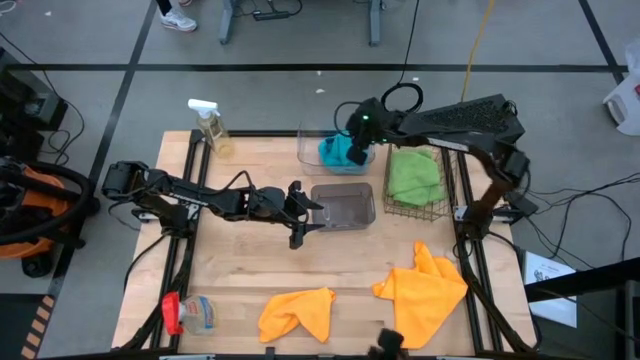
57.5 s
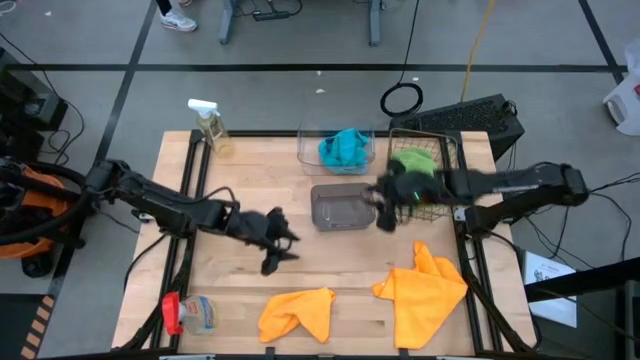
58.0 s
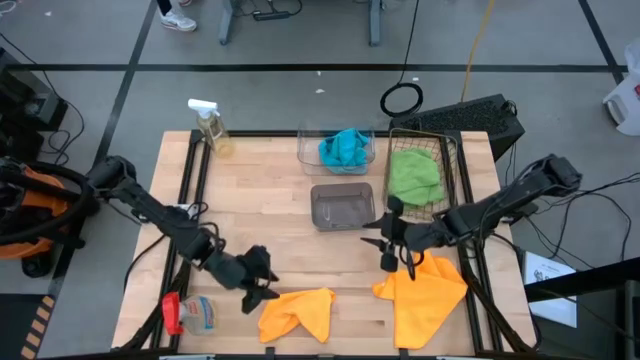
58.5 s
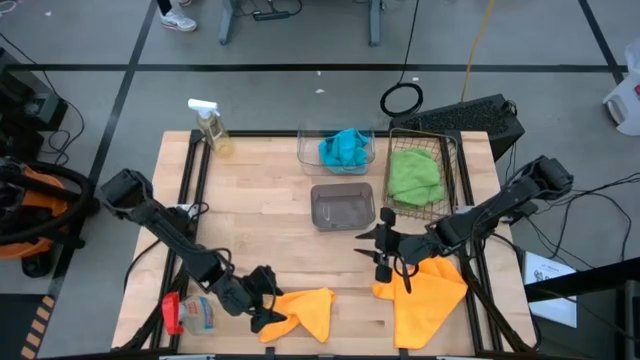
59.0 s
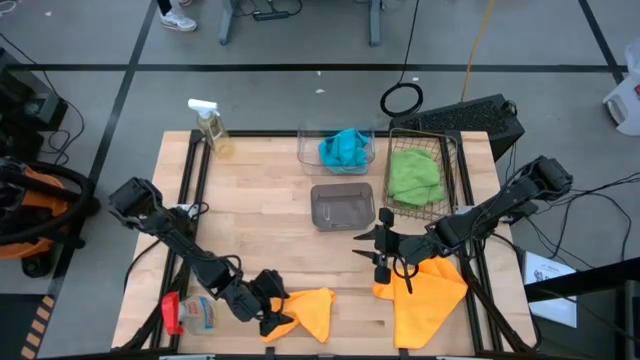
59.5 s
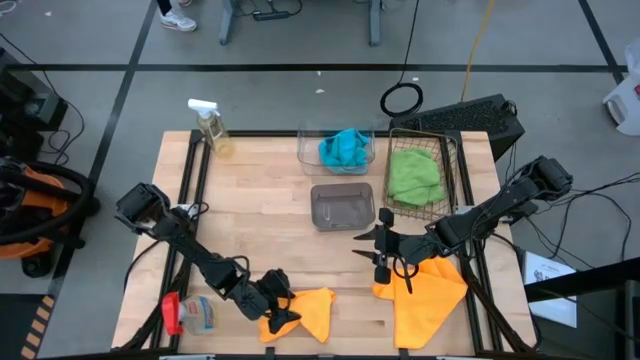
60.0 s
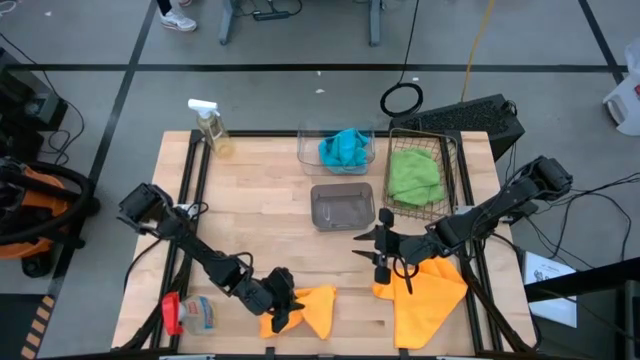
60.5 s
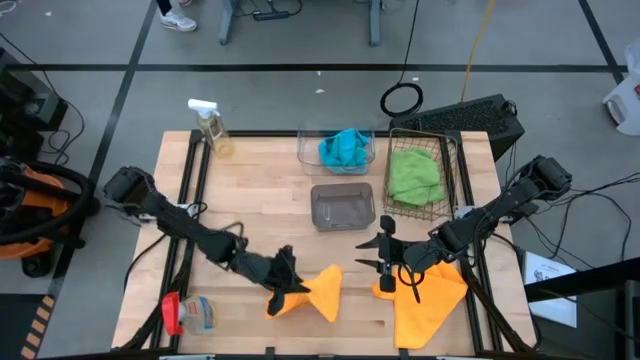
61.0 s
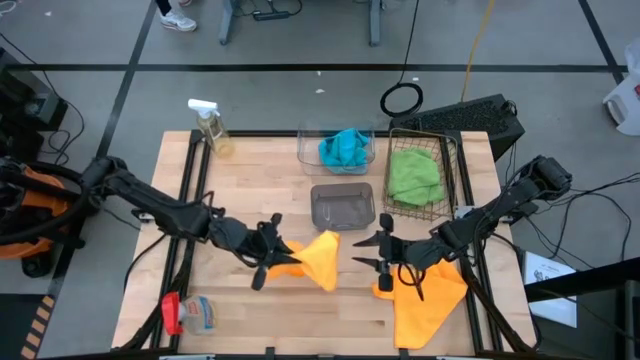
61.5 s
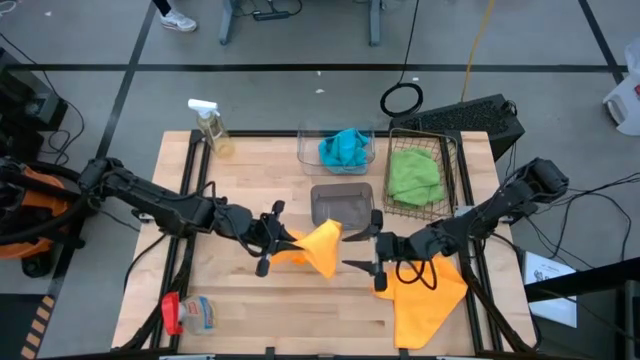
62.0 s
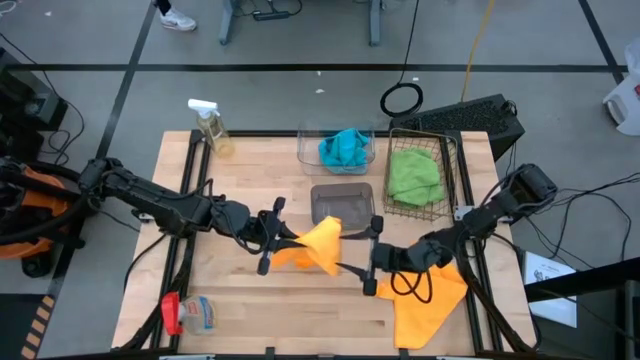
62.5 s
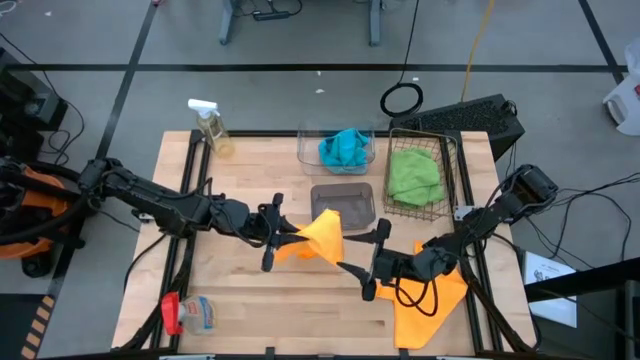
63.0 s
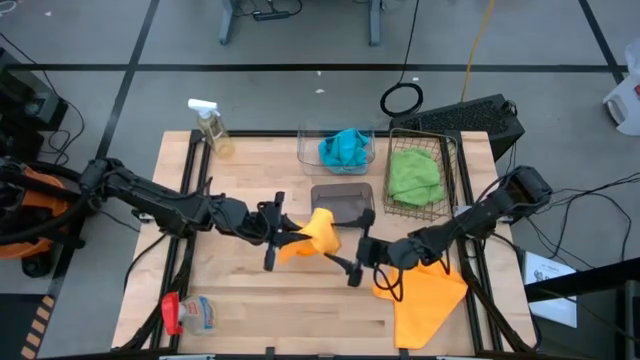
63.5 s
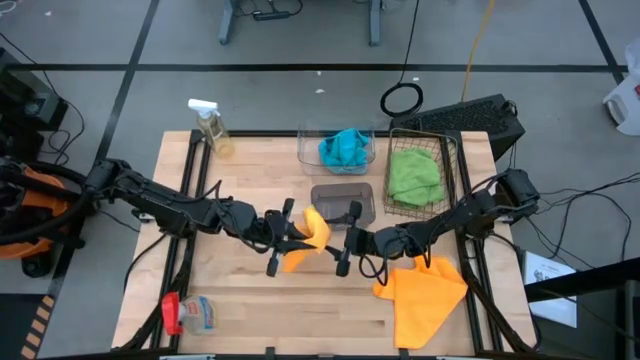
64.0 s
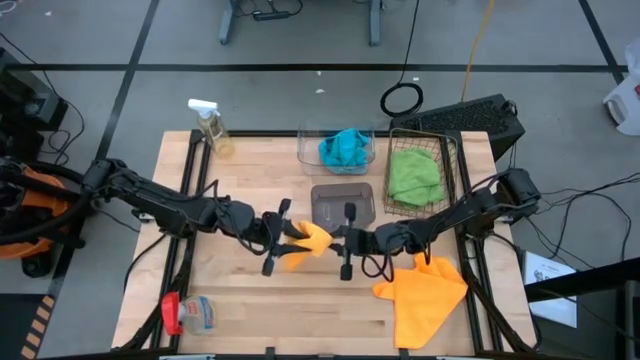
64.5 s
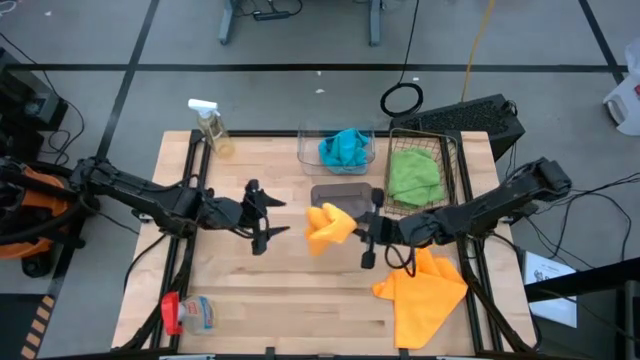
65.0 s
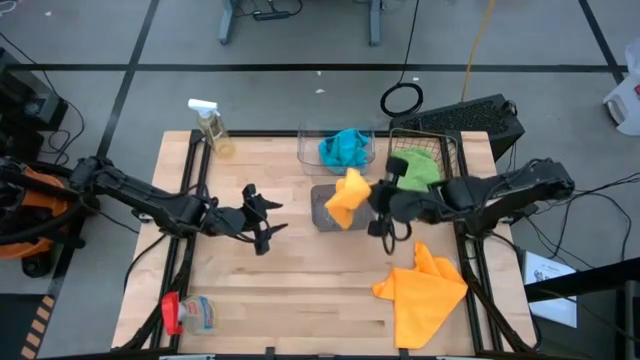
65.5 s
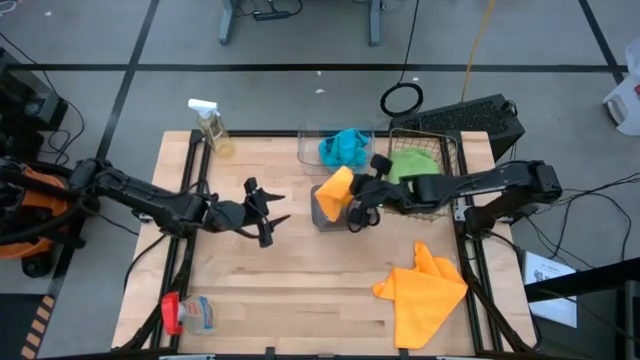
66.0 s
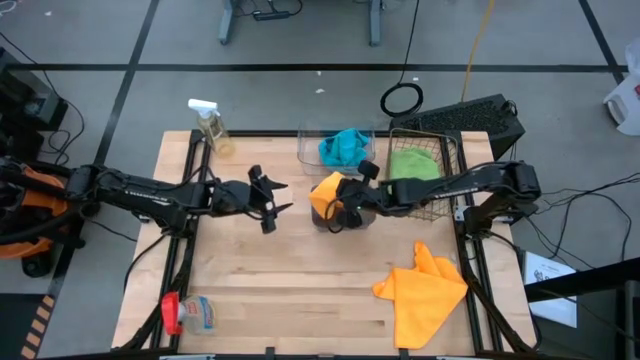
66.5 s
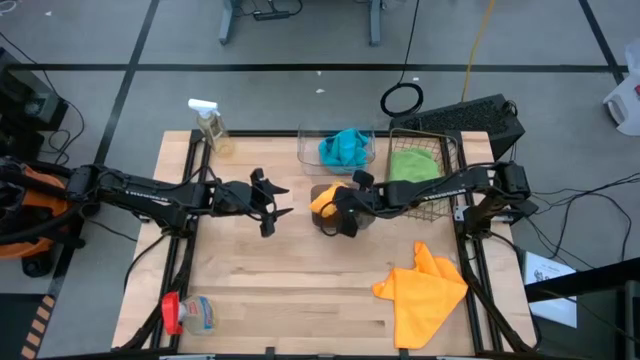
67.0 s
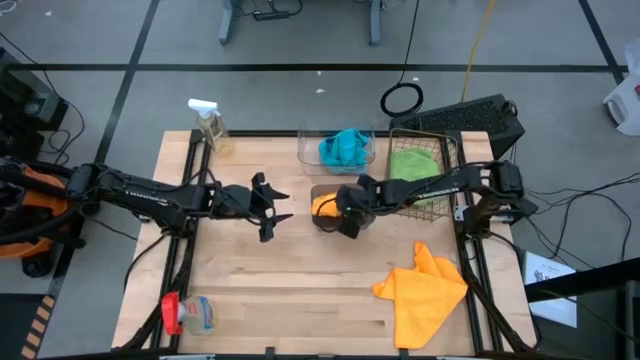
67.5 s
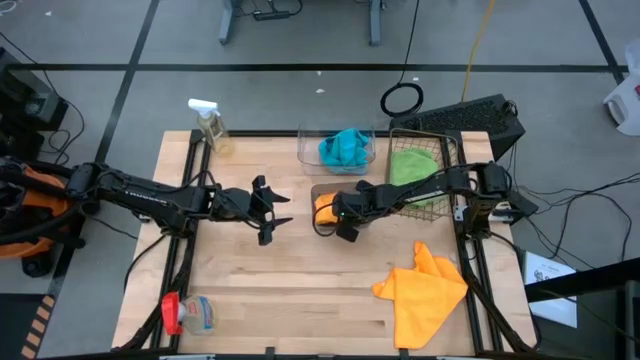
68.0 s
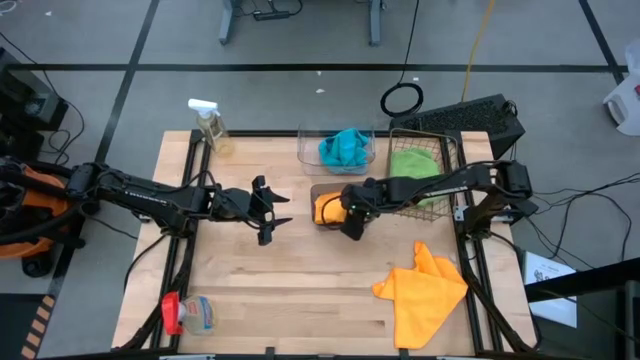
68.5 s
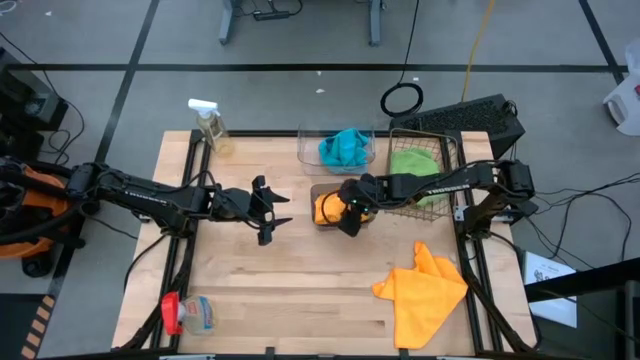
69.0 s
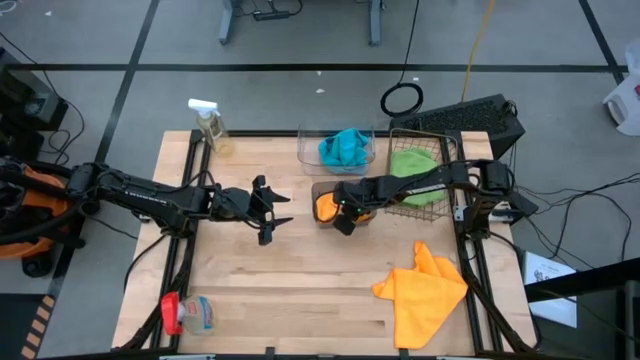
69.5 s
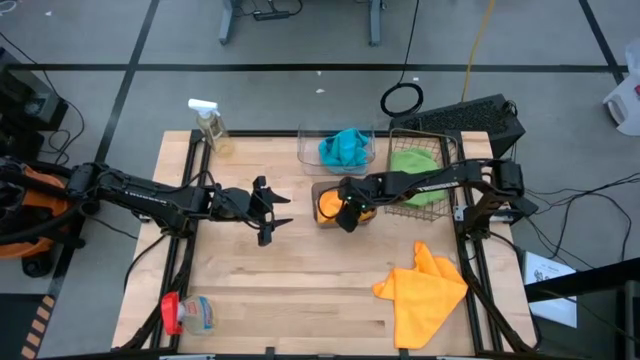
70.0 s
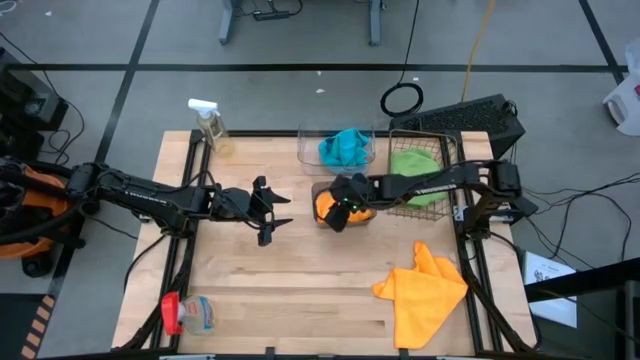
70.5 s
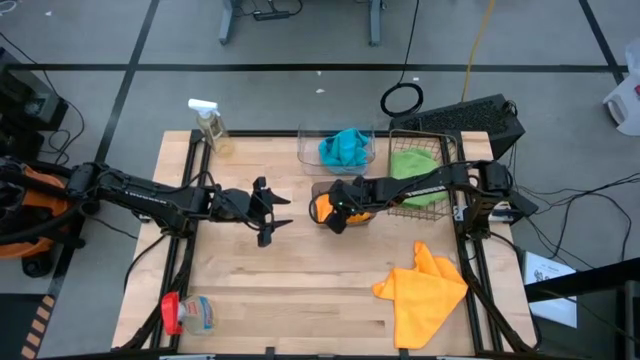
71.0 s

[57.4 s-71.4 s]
Task: Sort microfiber towel by color & place in baskets
Put the left orange microfiber towel into the black bin

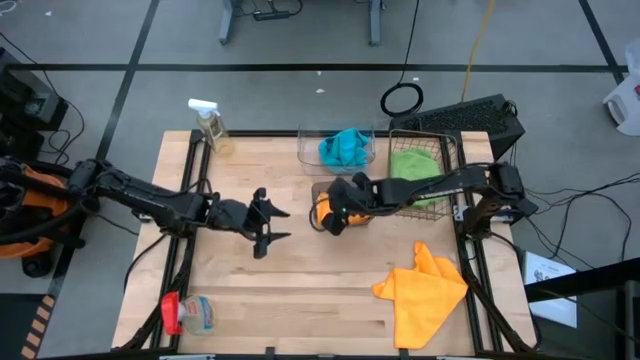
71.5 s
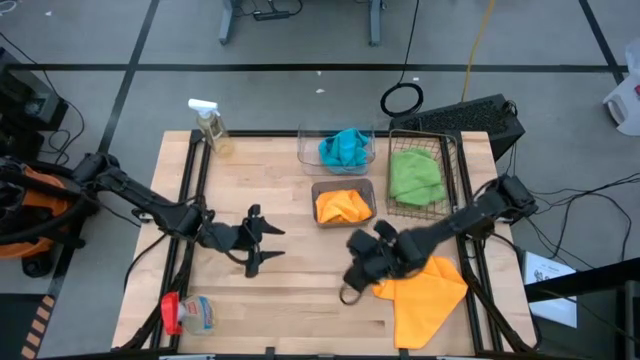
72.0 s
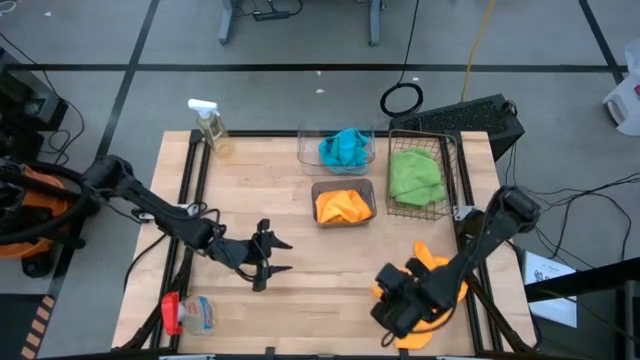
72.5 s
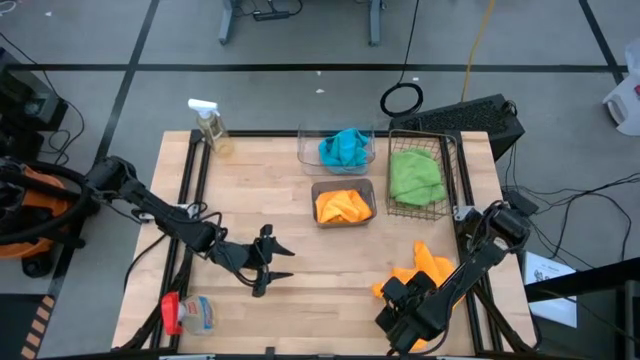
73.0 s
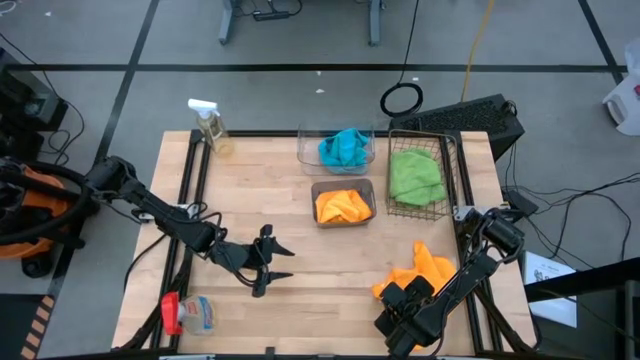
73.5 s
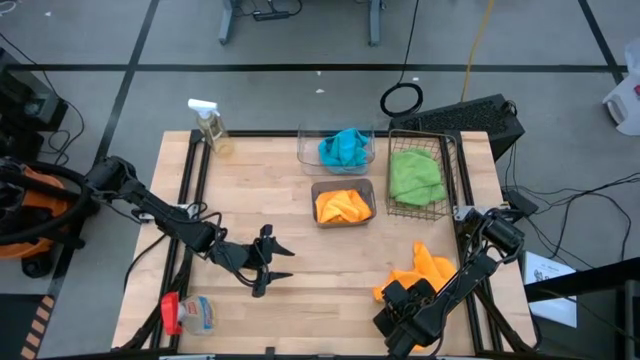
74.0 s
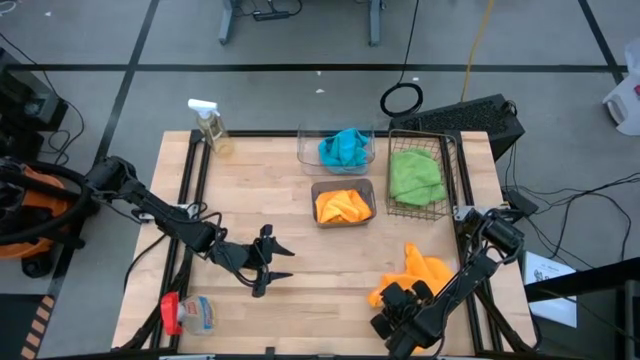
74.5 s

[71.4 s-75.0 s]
Put the orange microfiber towel into the black bin

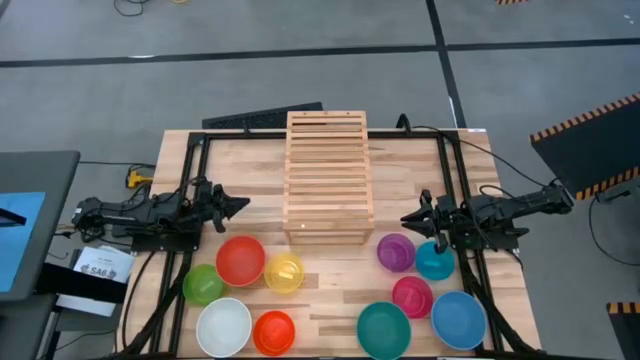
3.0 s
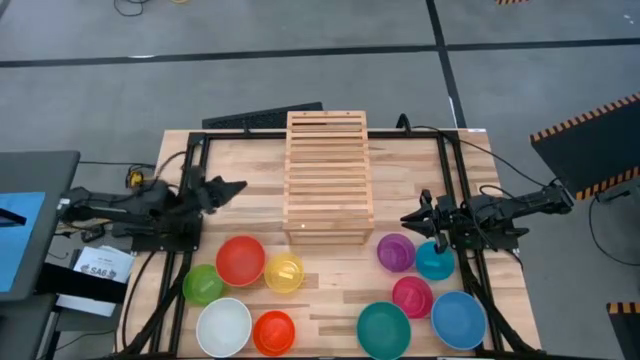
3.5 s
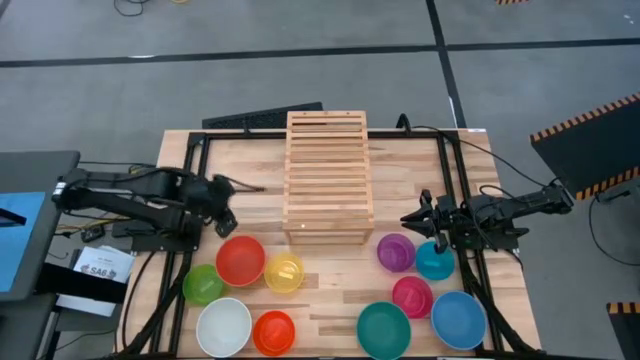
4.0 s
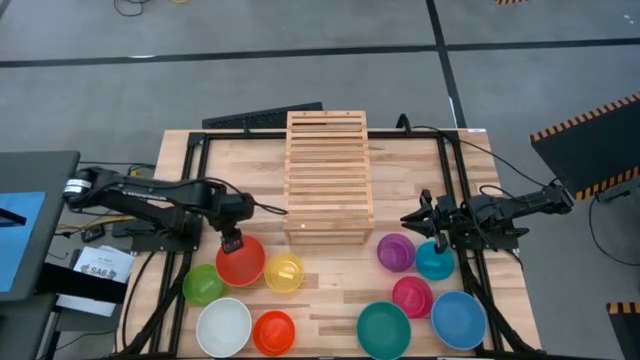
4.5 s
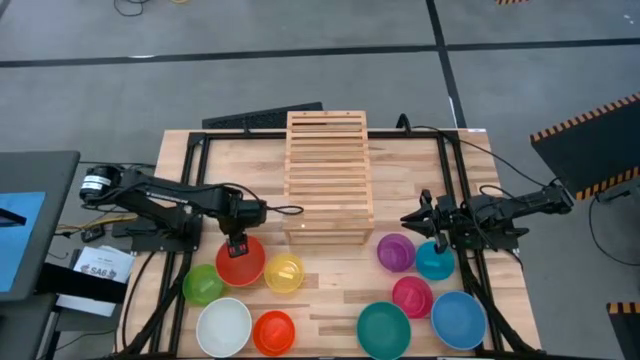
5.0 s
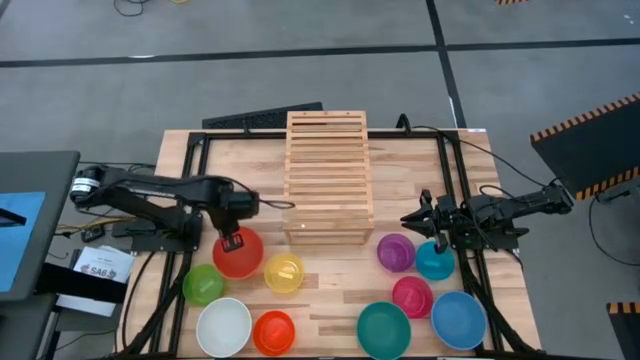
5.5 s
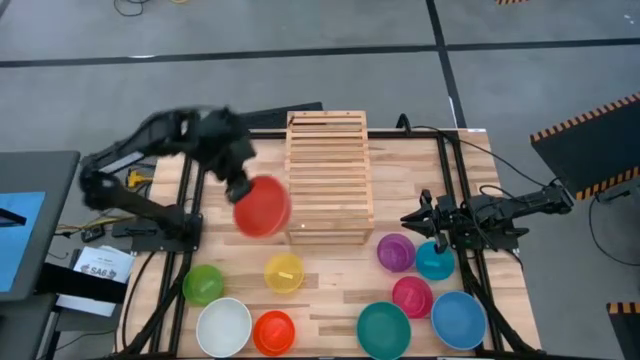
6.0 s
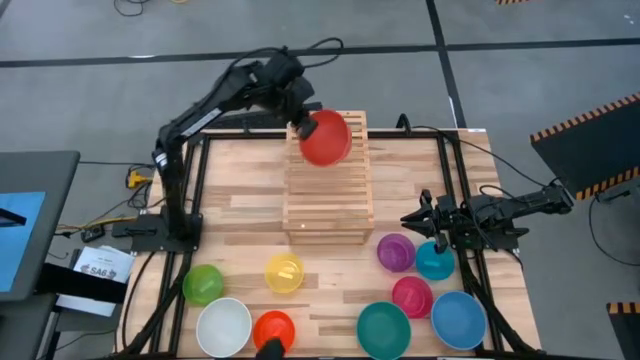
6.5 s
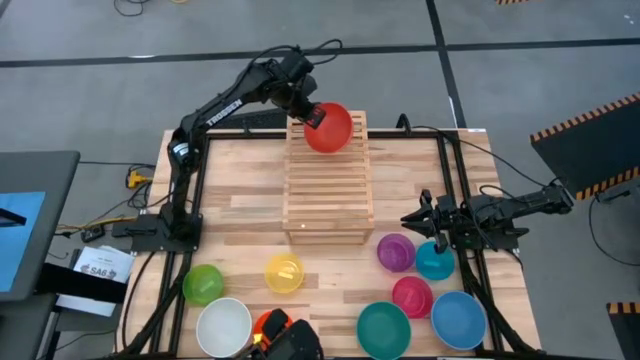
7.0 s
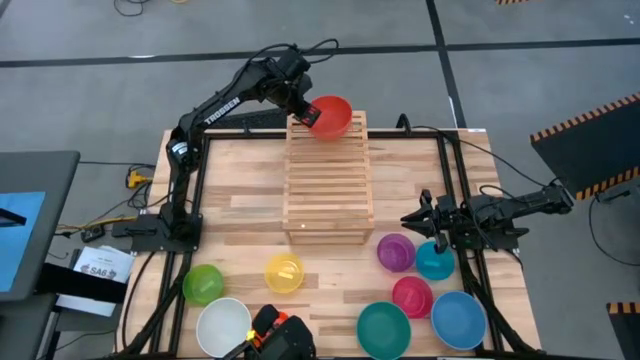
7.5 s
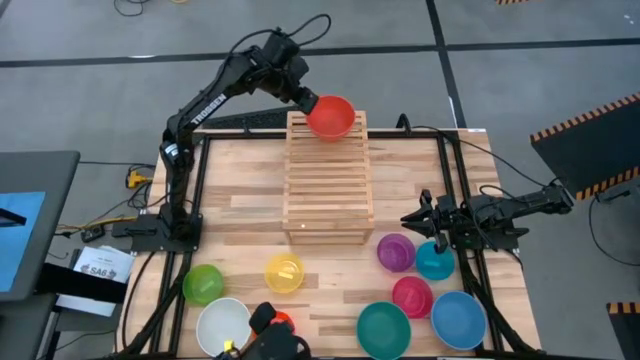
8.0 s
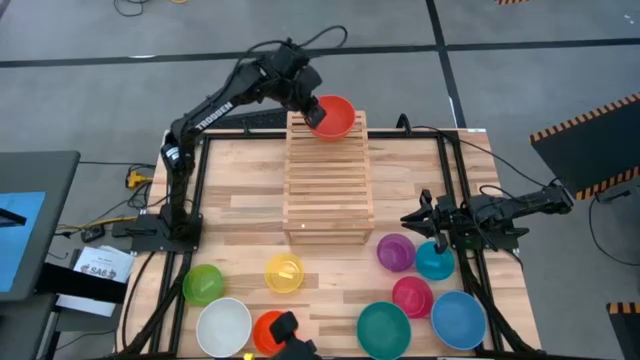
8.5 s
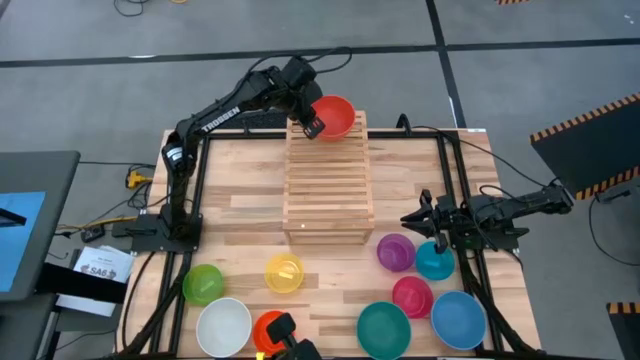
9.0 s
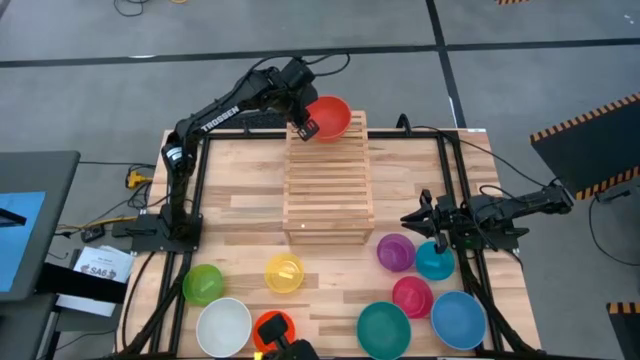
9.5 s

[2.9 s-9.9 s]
Task: Place and stack bowls onto a shelf
Put the big orange bowl on the shelf
